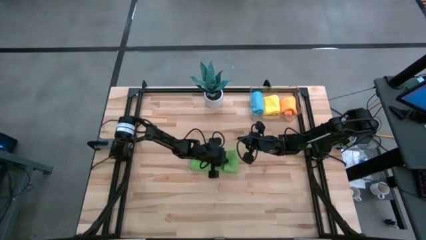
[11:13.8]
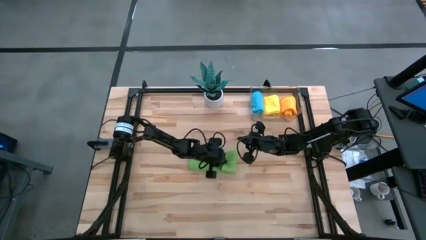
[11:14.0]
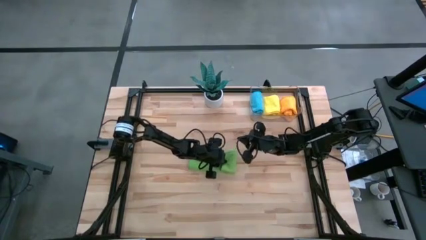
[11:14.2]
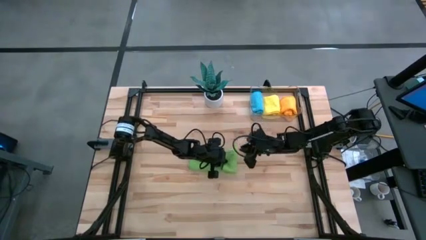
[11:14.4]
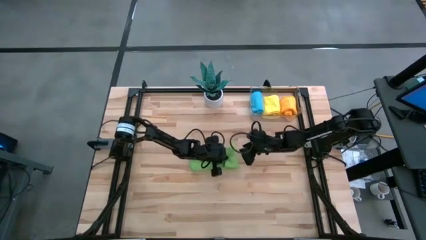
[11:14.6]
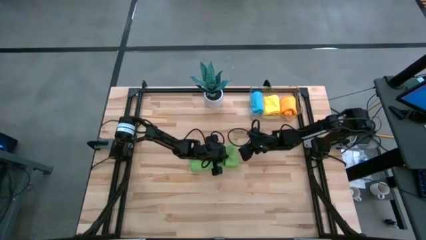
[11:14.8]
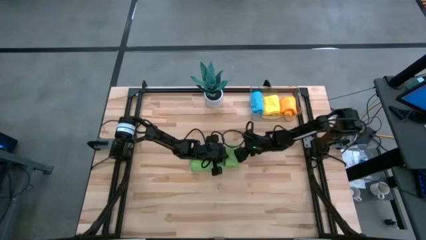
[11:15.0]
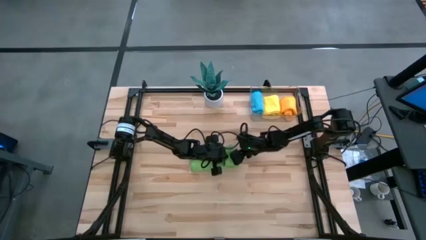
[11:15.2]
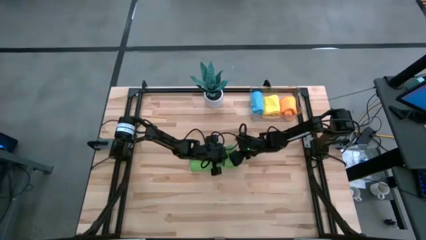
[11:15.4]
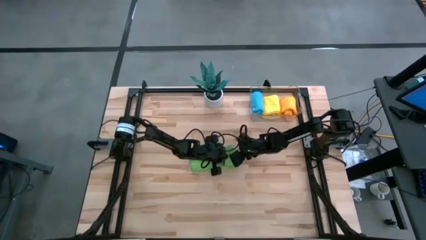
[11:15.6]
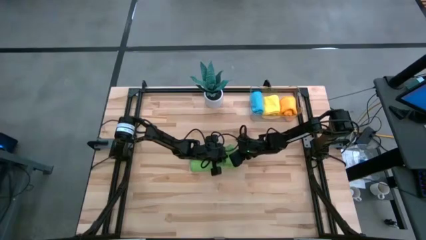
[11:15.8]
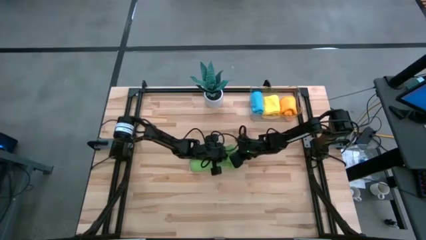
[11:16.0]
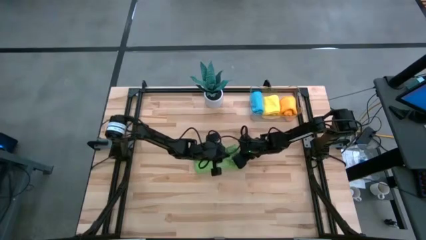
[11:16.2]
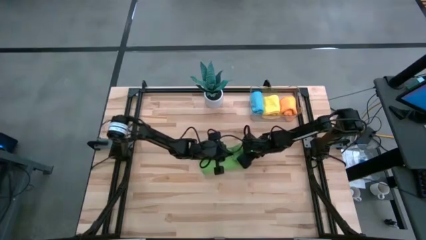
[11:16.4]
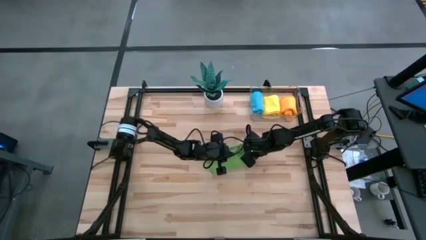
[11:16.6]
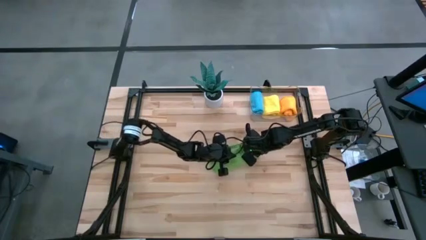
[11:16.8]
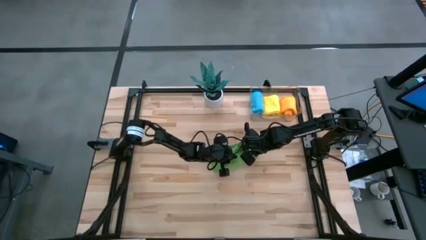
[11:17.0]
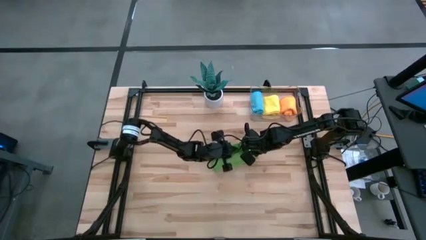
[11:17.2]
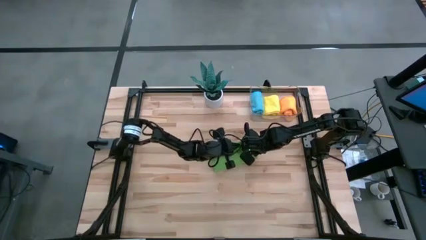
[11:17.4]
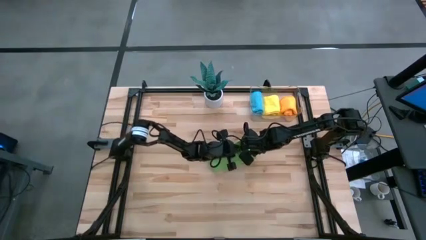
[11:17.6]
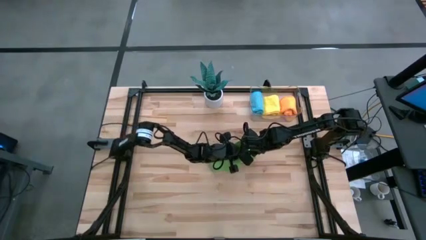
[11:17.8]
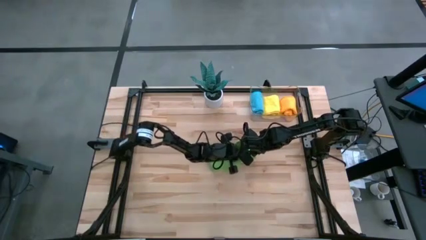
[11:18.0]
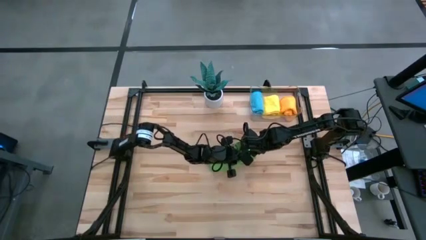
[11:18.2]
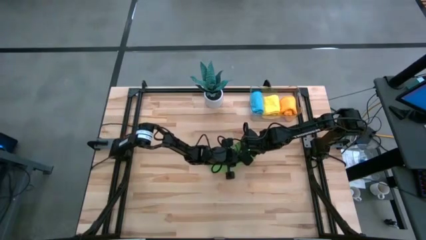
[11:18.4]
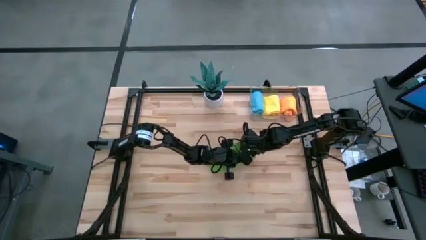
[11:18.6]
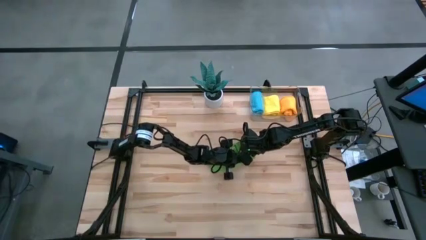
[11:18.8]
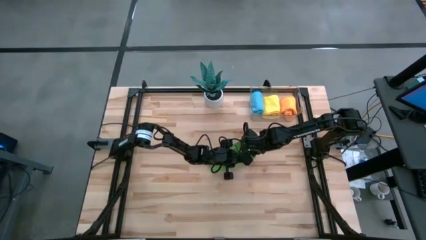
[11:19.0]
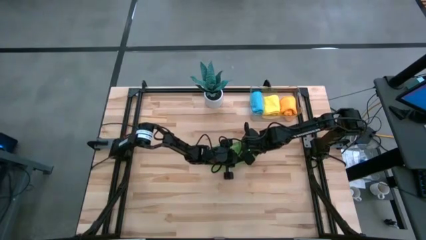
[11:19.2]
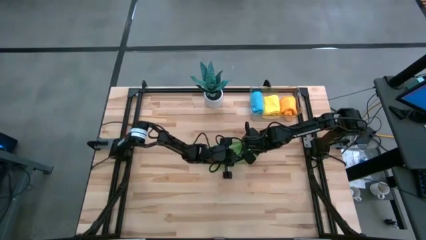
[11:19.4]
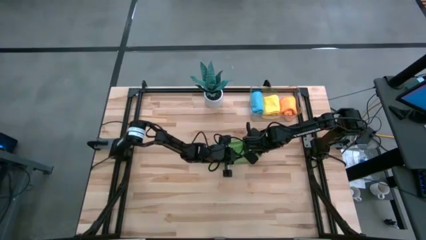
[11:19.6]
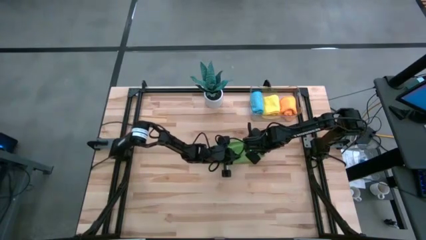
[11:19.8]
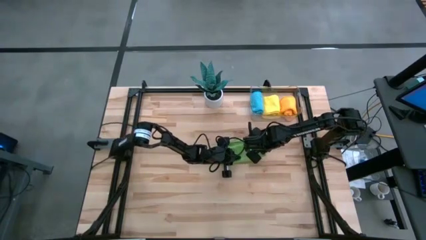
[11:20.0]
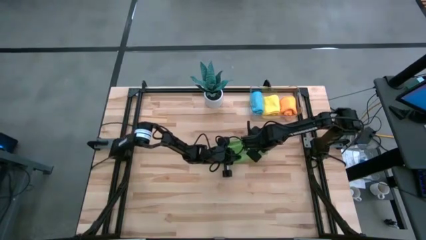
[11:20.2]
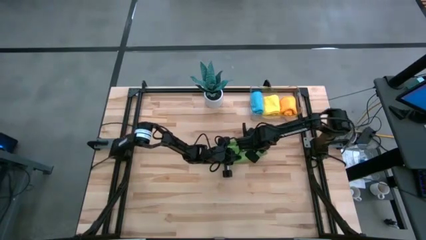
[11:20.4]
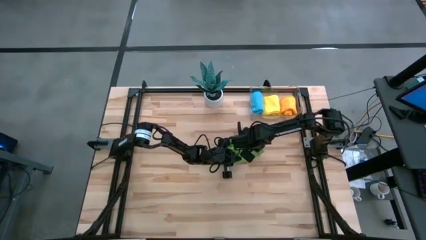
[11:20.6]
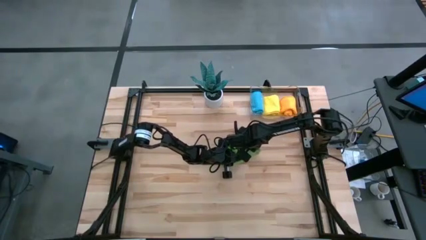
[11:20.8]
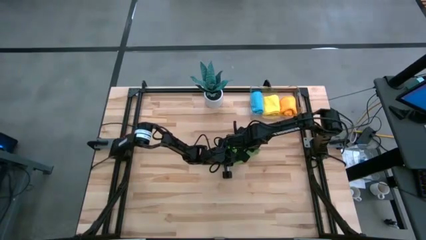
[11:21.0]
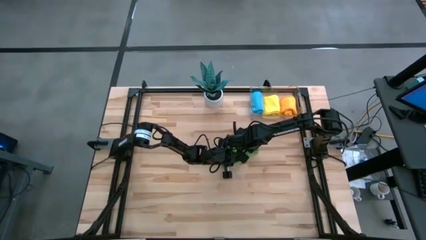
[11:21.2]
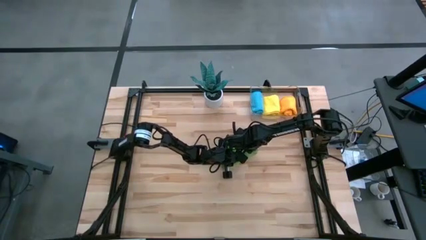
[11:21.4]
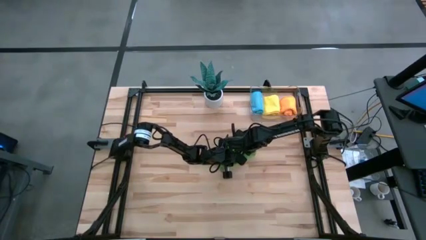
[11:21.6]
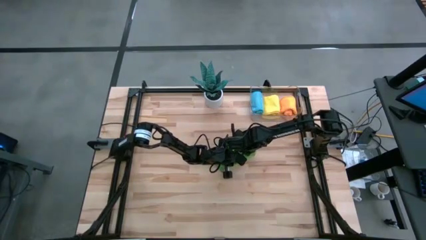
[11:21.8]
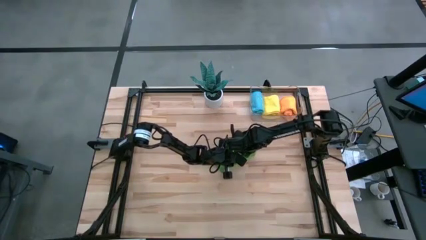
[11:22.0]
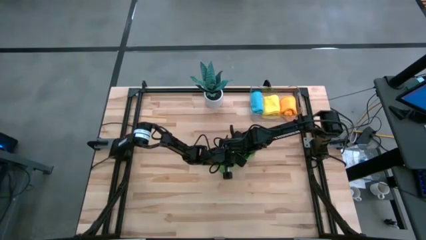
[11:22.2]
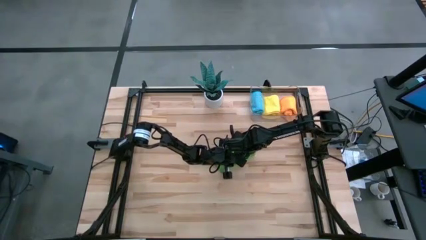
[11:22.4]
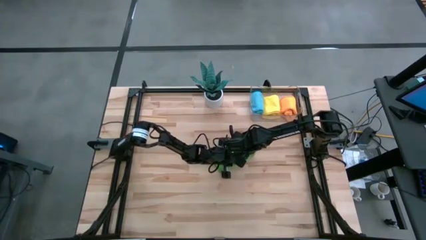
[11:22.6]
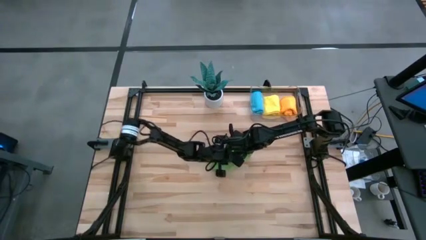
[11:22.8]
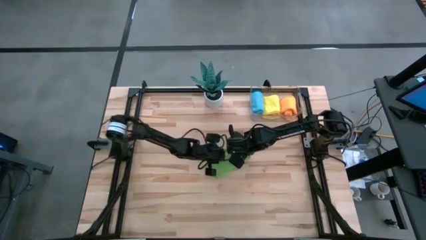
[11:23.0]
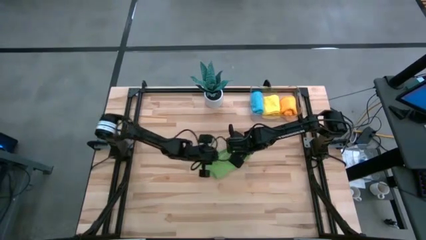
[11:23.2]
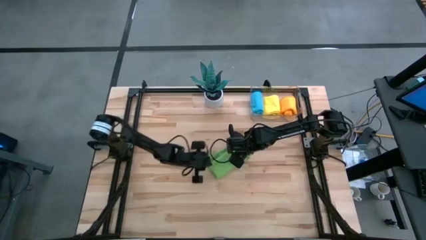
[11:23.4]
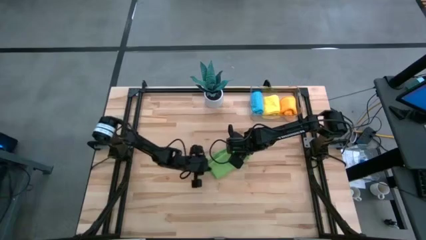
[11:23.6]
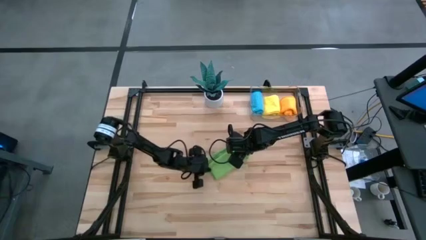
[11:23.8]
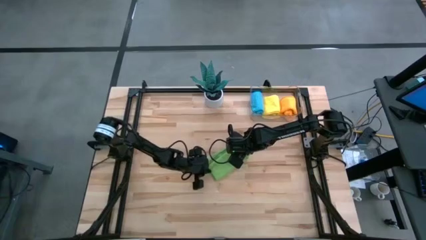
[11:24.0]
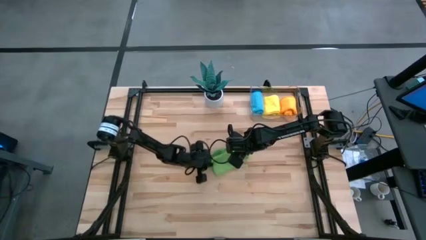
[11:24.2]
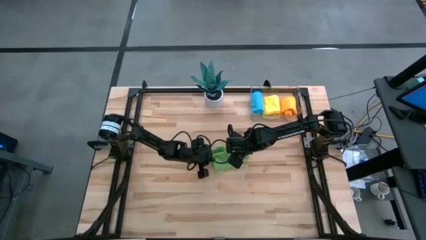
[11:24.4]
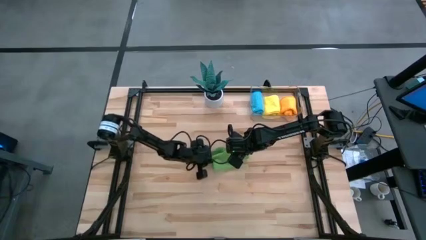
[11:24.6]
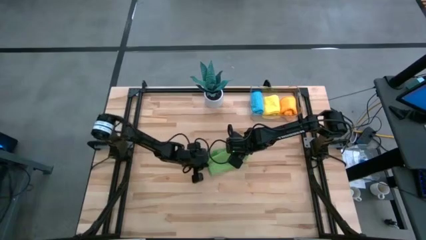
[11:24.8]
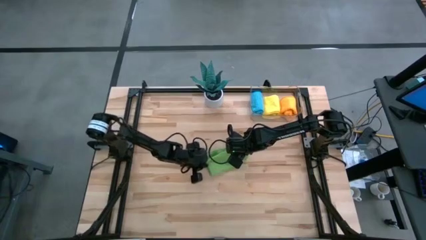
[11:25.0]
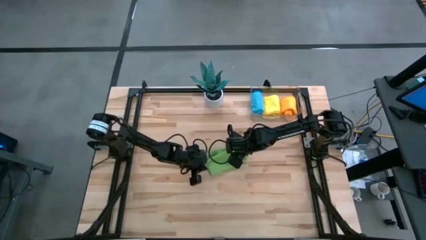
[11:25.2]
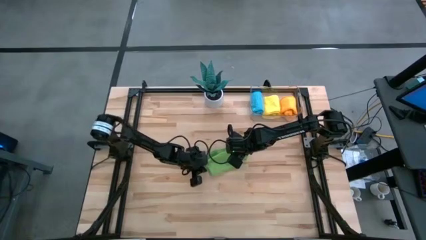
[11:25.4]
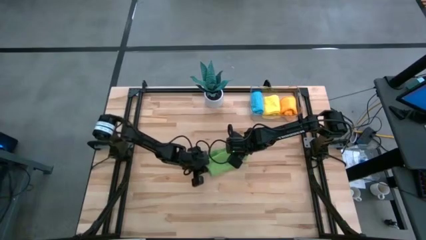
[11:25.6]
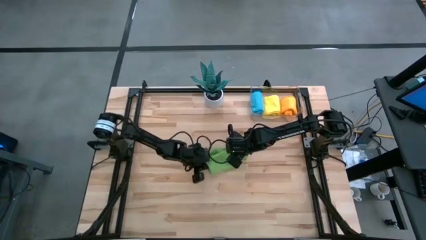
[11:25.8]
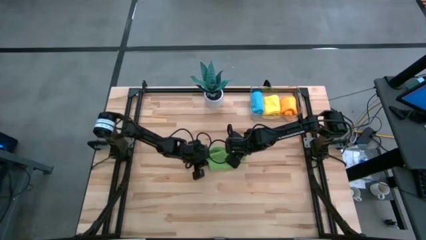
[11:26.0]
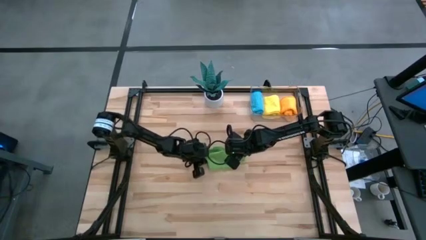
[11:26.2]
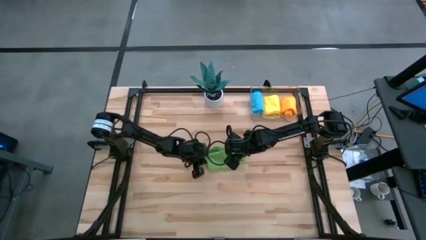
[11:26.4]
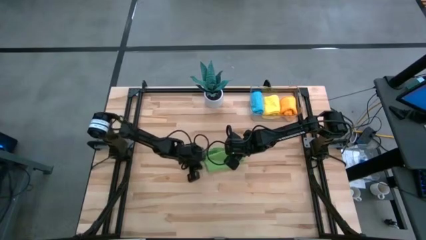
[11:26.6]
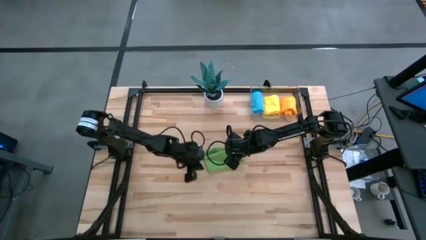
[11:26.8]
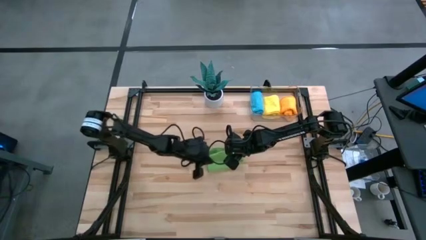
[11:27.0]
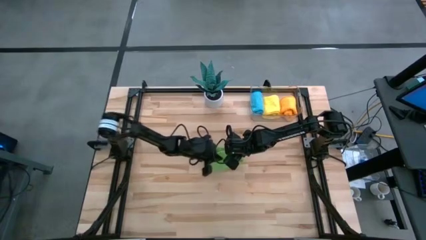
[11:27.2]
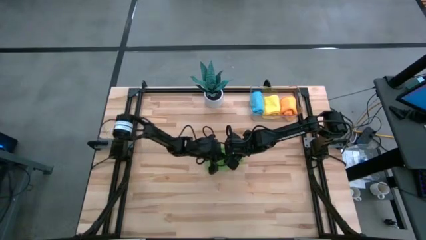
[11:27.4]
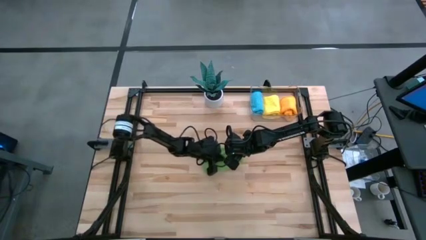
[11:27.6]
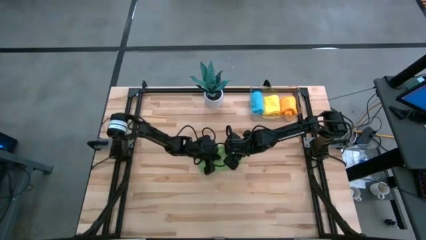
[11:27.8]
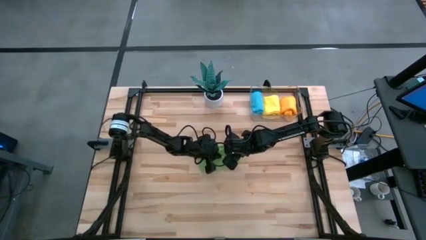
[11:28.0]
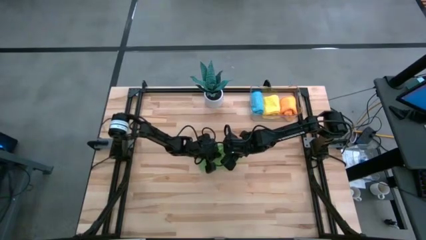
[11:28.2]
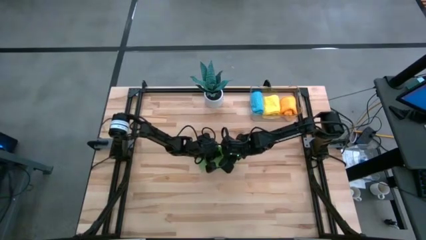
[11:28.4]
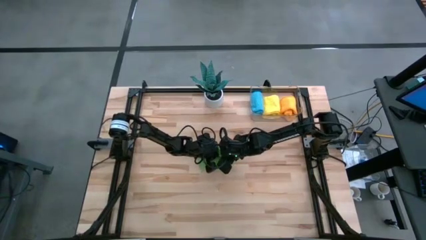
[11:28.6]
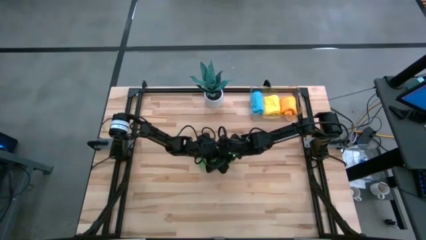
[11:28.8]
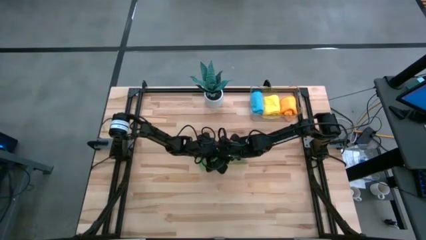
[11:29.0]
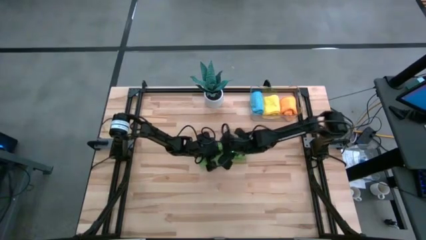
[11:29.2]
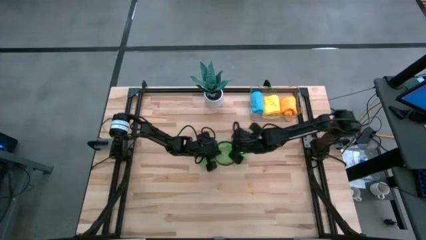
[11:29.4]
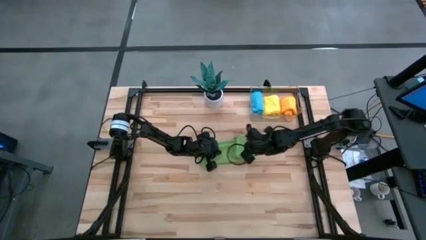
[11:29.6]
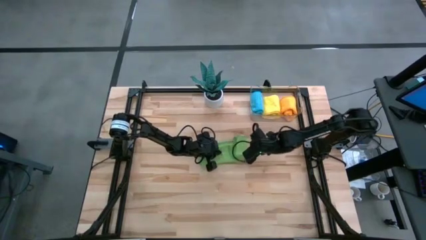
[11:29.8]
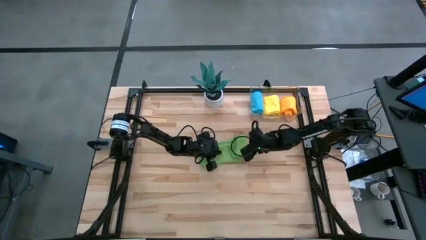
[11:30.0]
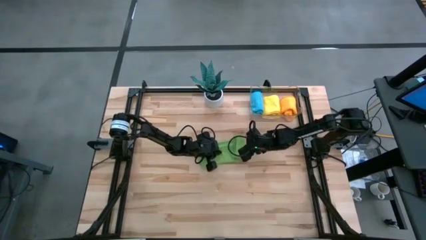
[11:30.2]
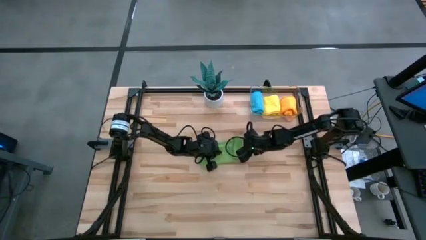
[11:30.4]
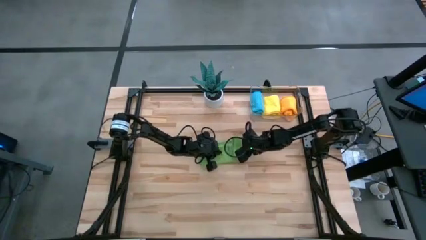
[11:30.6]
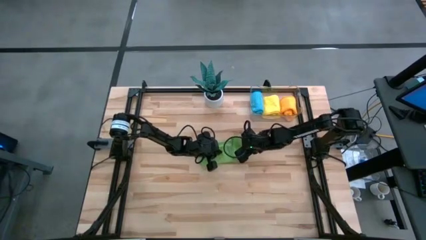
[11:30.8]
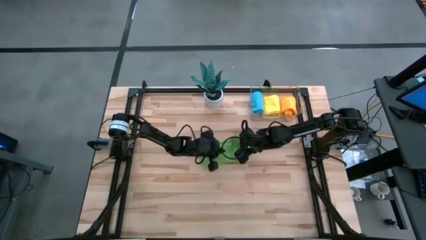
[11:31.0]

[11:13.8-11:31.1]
Task: Roll microfiber towels into tight, uniform cylinder then place into a basket
Roll the green microfiber cloth
